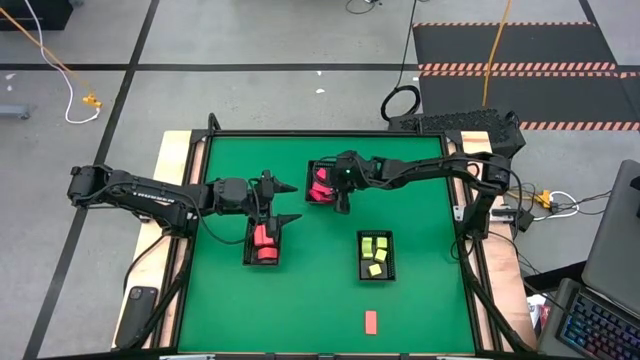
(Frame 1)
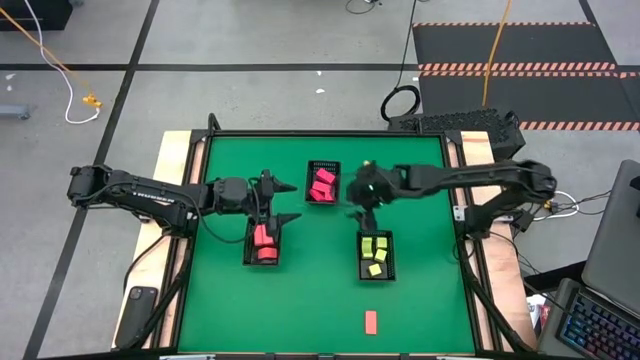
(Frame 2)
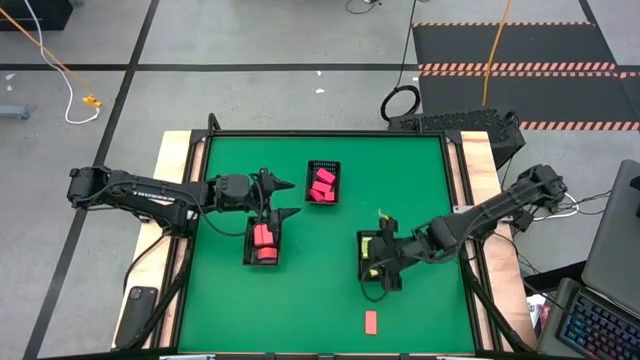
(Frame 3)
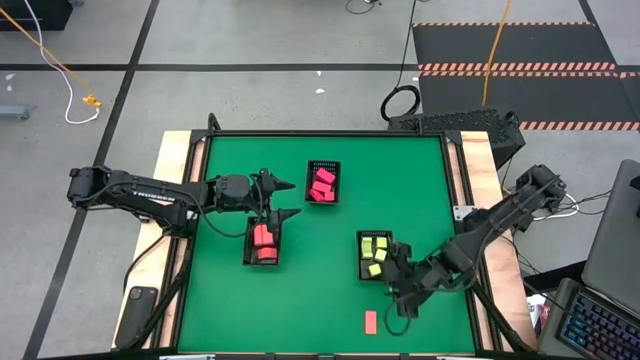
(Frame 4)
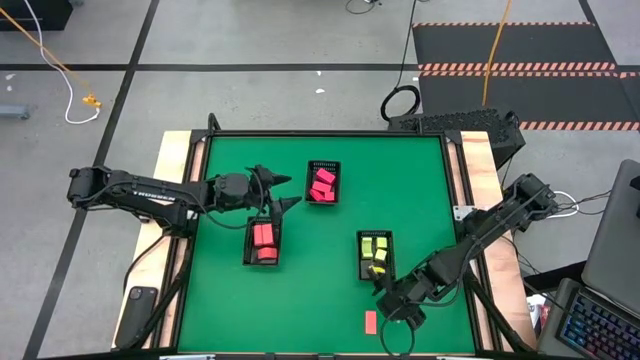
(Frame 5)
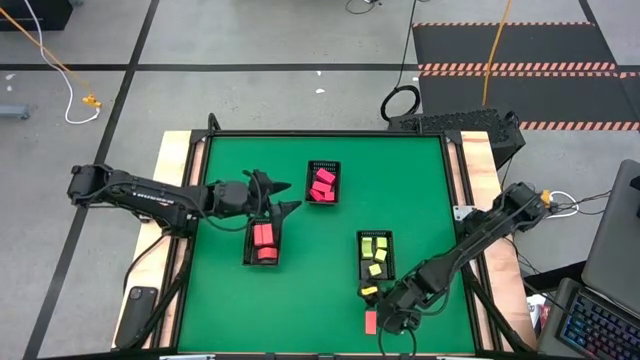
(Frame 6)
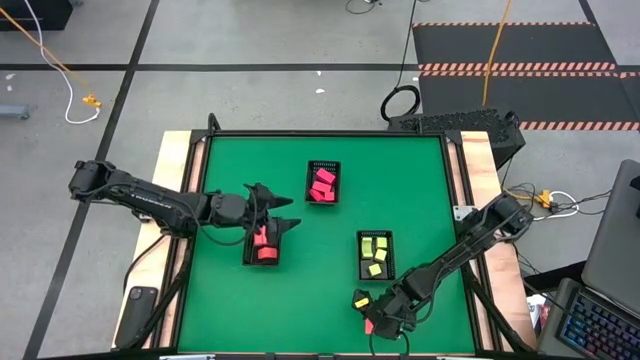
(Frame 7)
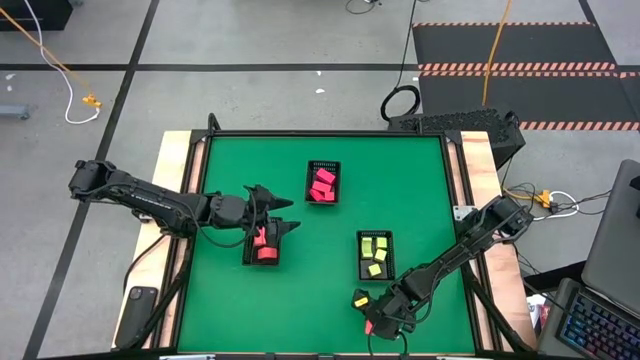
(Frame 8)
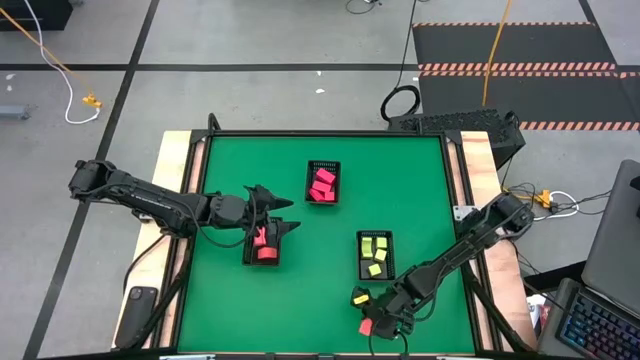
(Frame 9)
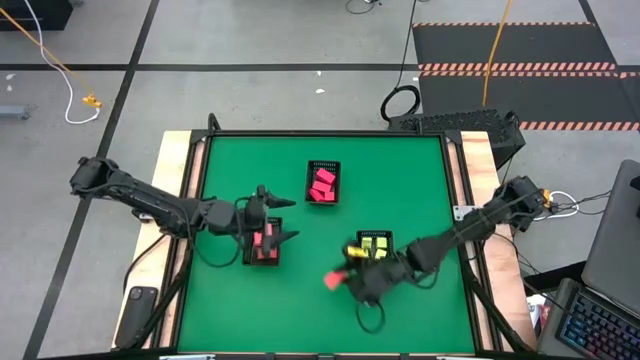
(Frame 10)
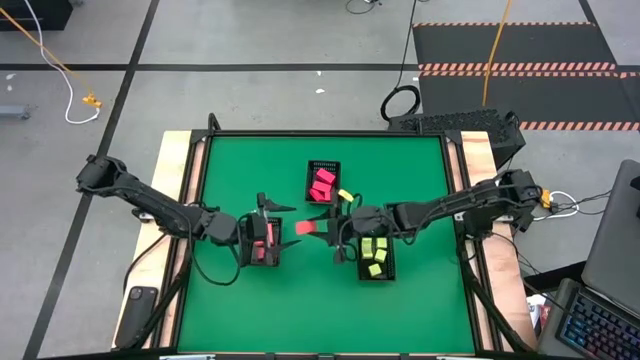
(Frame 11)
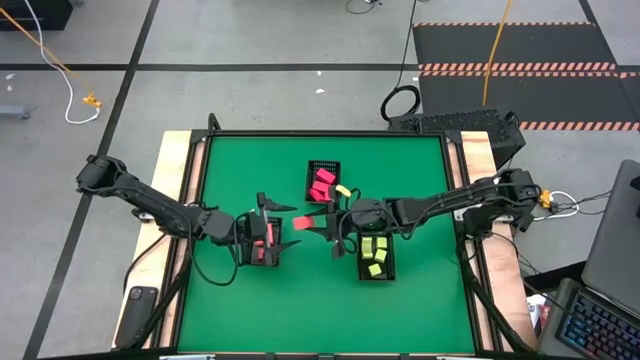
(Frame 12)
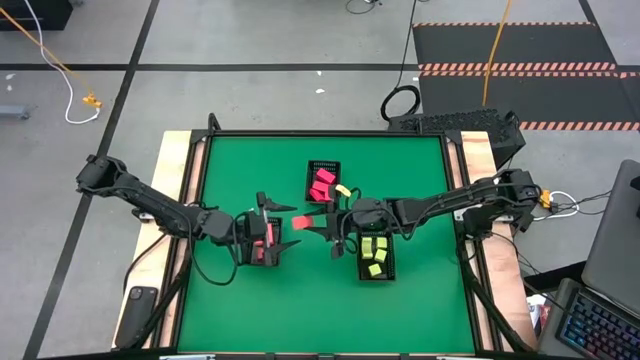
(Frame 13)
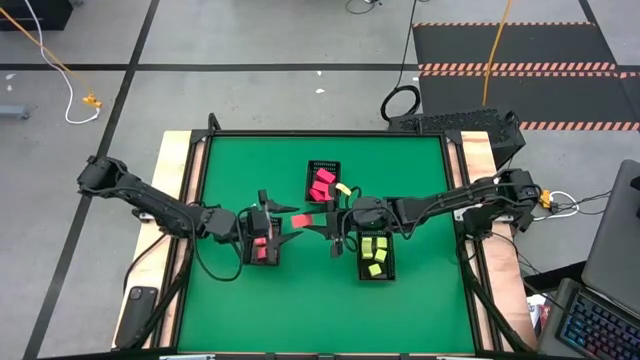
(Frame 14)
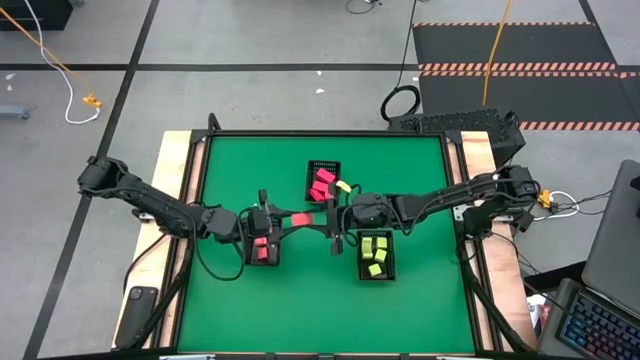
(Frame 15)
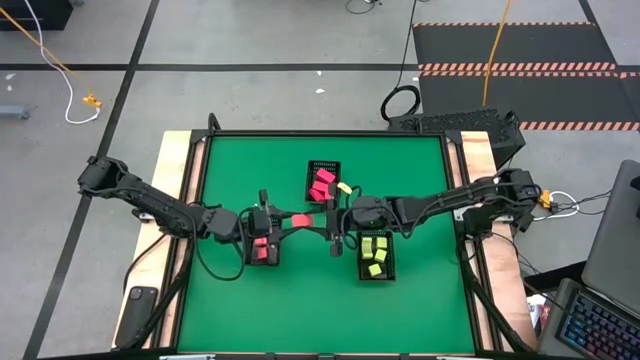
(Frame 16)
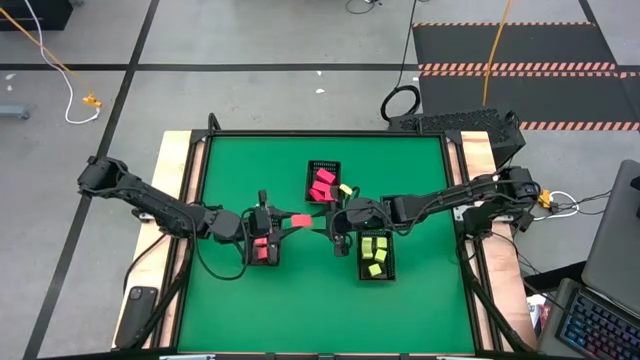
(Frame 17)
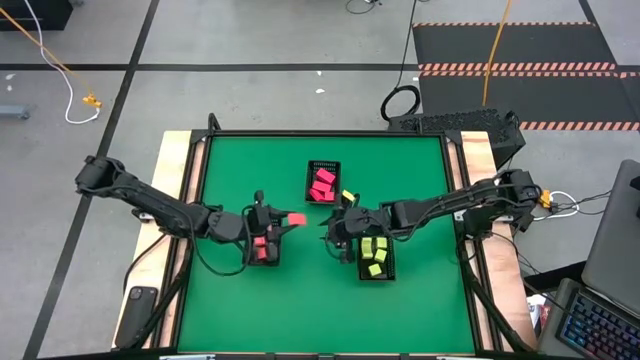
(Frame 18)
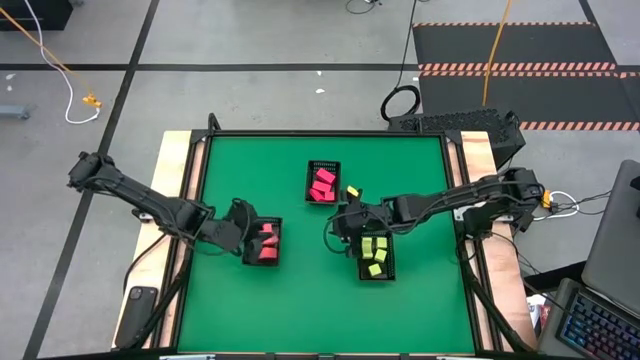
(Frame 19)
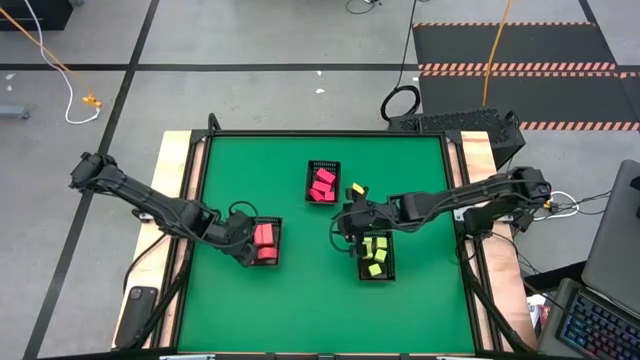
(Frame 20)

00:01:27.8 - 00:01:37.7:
Task: Sort & place blocks by color
Put the orange block into the bottom left black bin

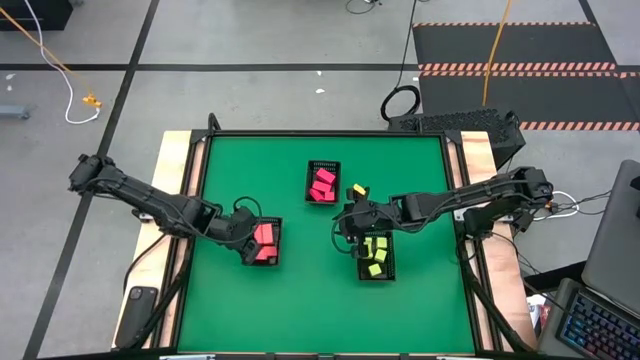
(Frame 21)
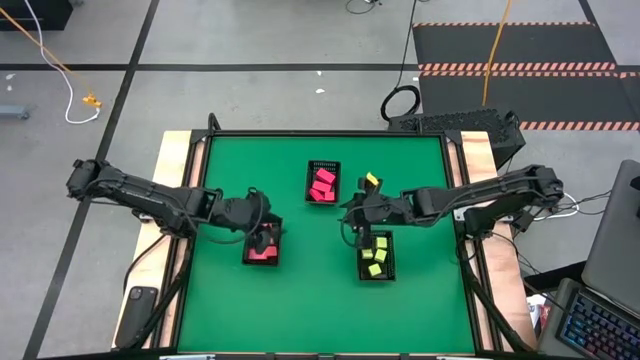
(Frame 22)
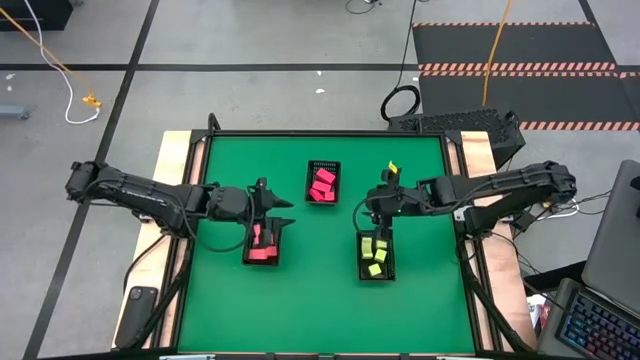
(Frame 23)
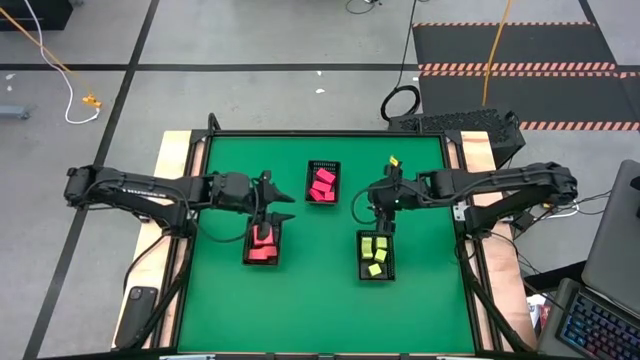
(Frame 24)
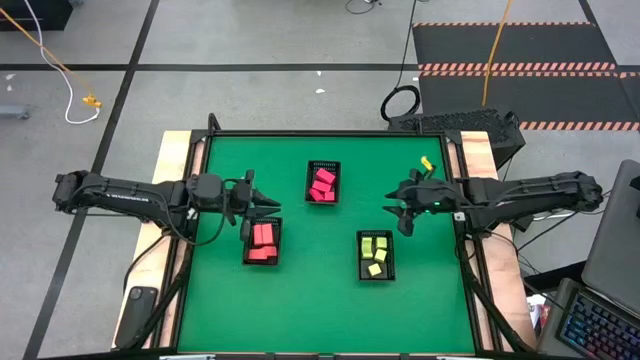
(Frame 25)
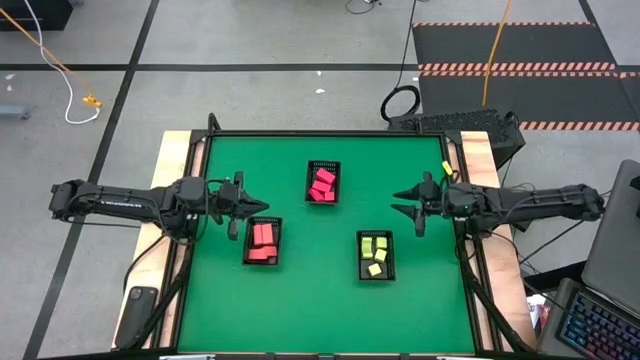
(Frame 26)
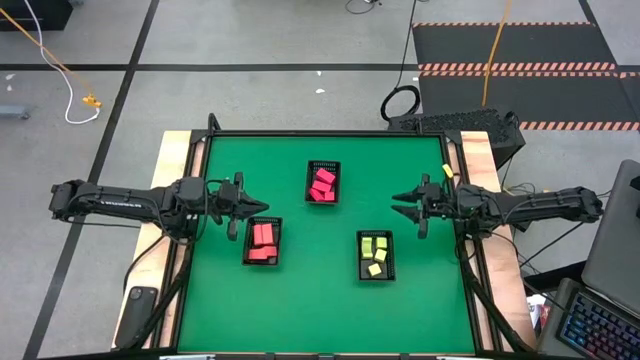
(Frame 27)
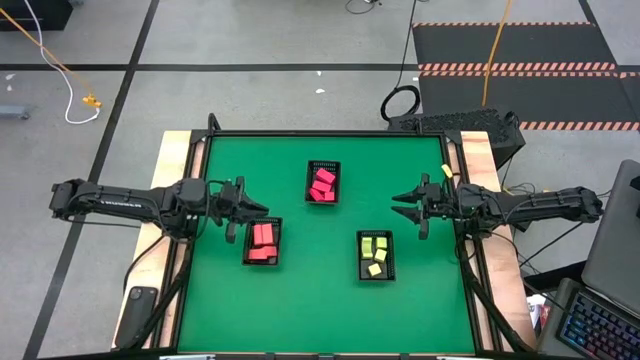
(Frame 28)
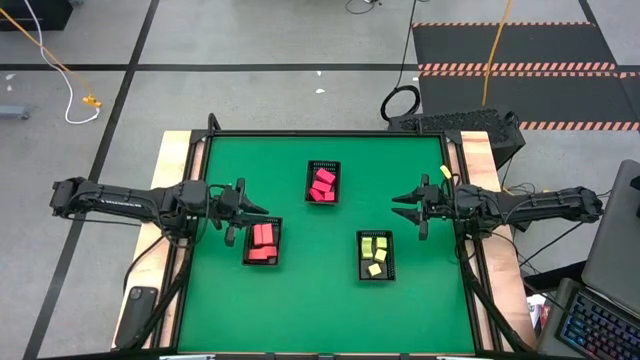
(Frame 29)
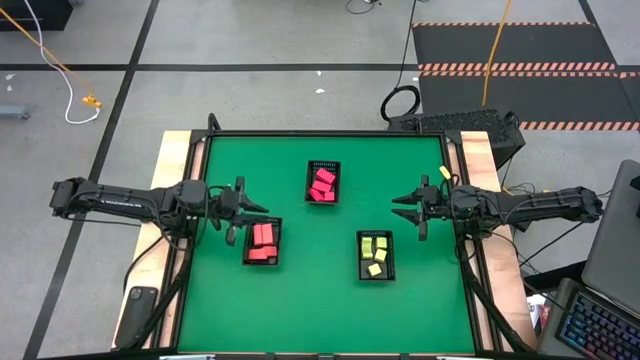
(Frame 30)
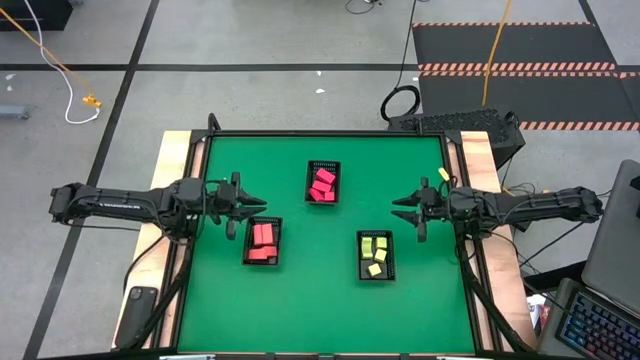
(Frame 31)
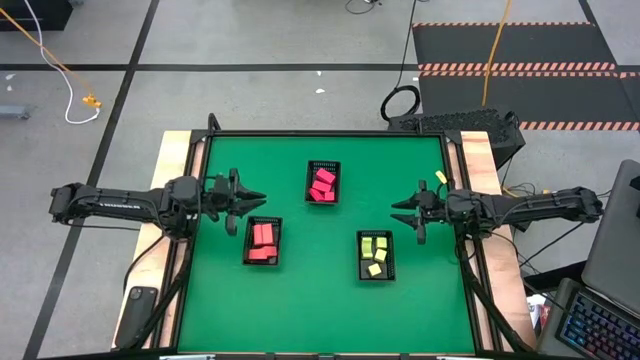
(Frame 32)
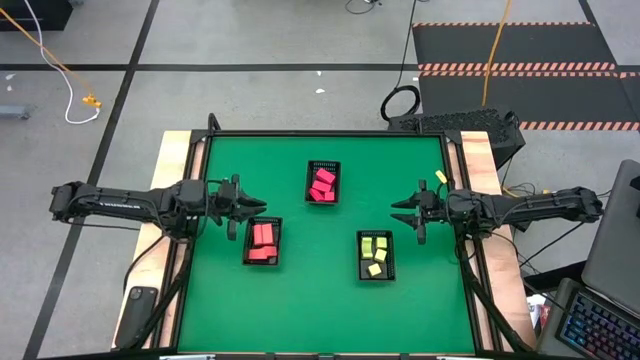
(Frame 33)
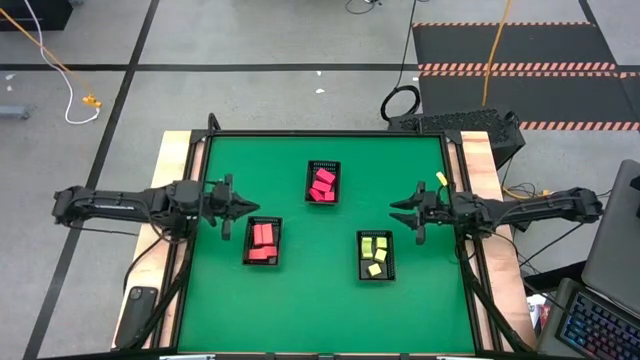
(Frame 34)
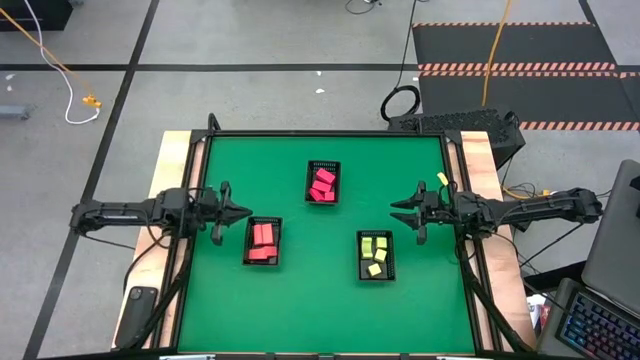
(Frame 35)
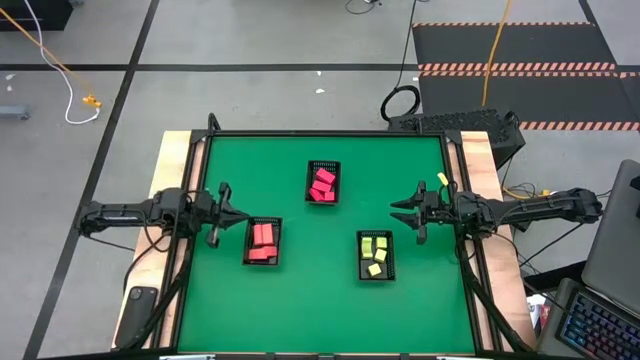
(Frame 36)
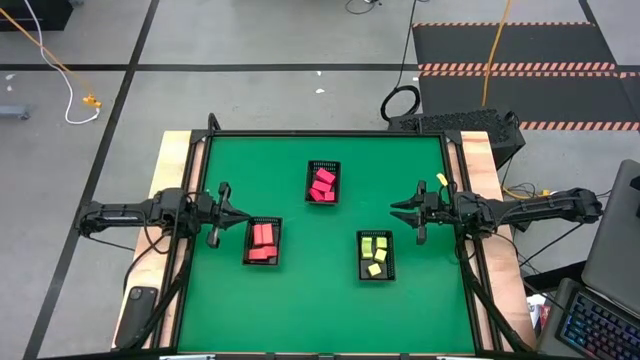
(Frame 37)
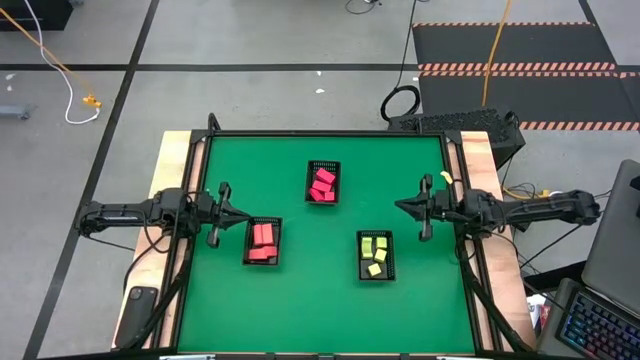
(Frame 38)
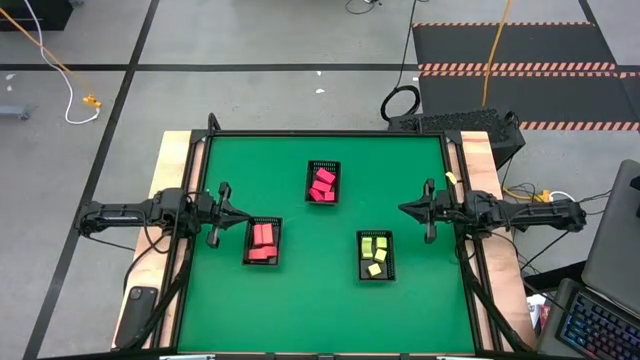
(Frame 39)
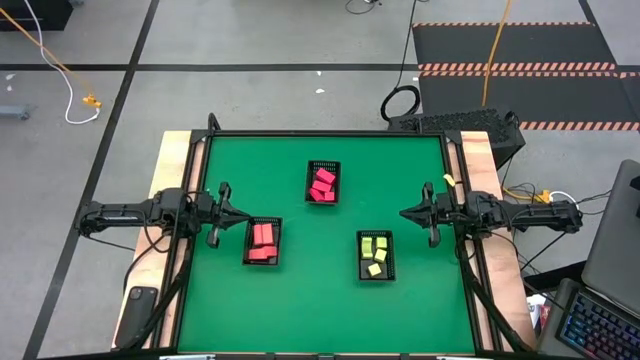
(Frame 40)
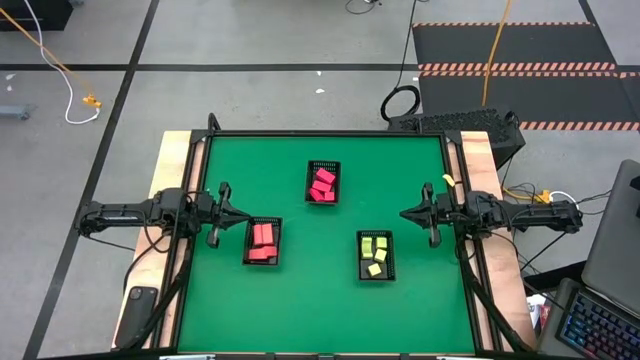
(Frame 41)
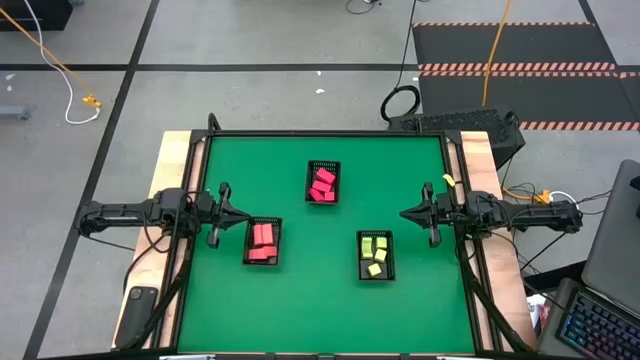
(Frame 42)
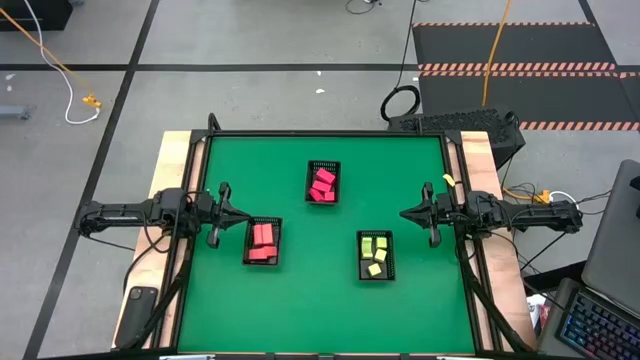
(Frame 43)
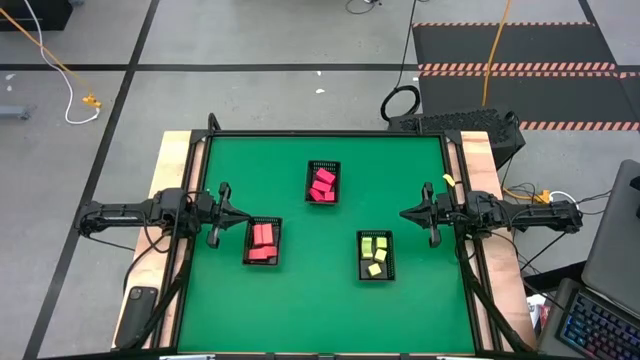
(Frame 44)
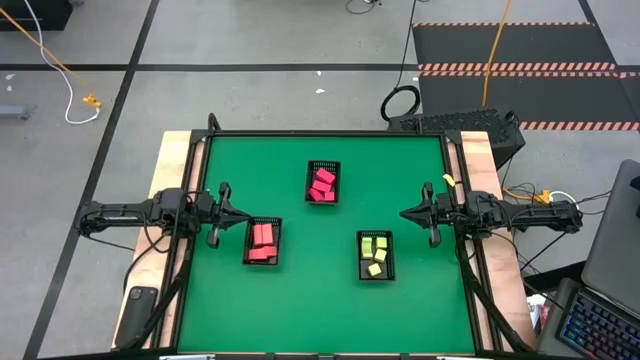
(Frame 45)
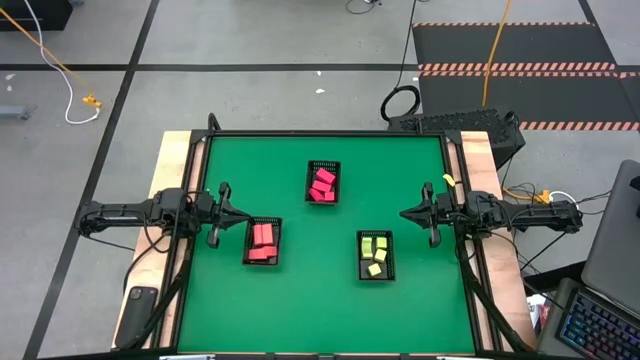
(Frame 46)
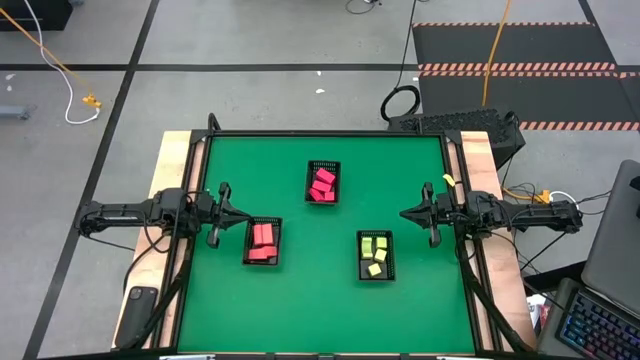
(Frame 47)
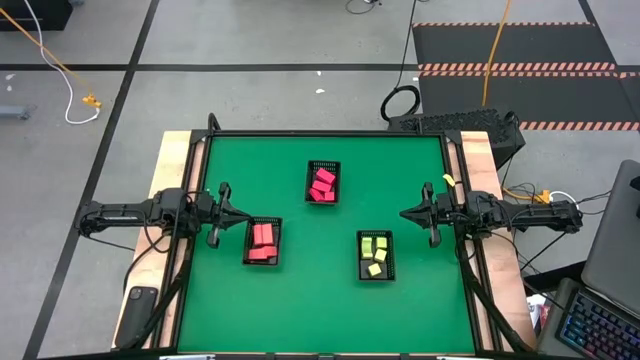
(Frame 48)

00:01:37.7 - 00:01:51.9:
Return to Home Position
